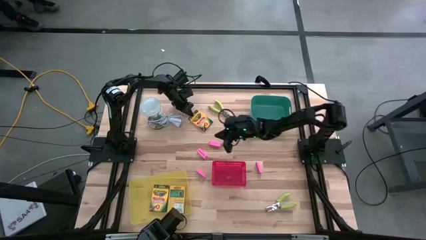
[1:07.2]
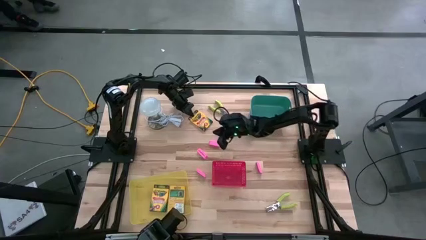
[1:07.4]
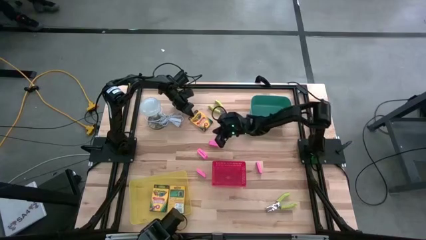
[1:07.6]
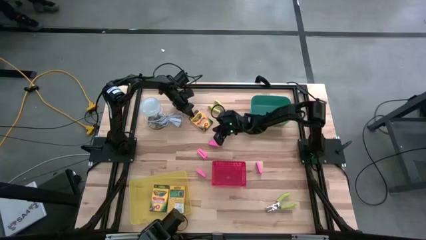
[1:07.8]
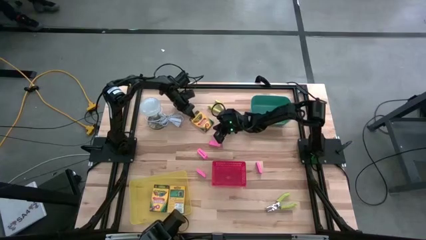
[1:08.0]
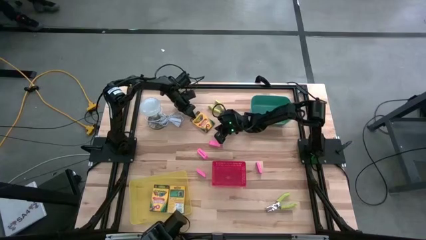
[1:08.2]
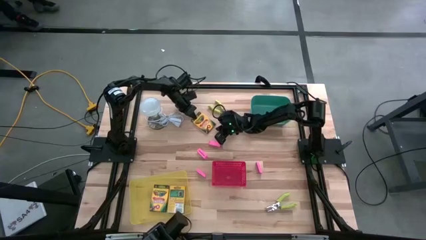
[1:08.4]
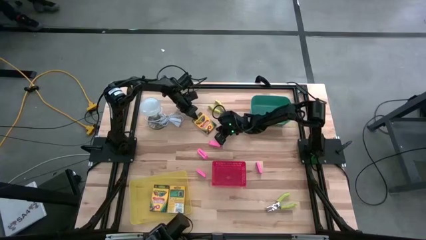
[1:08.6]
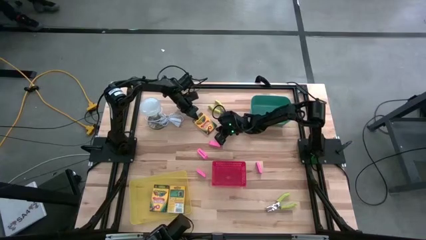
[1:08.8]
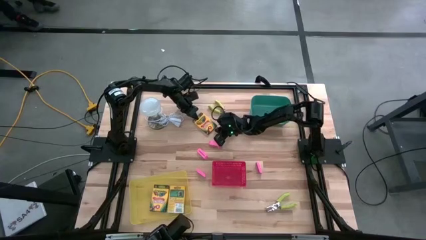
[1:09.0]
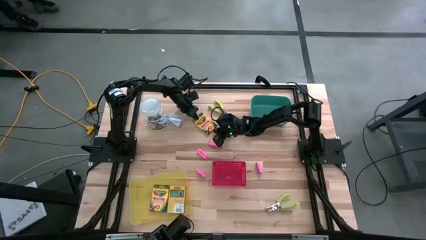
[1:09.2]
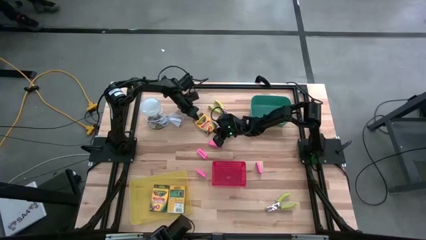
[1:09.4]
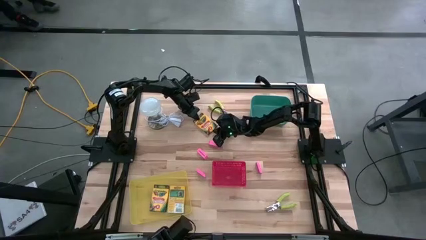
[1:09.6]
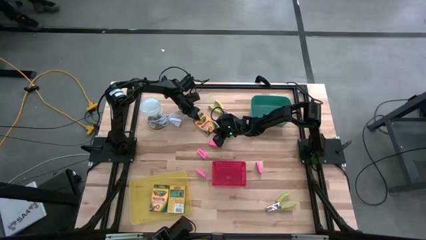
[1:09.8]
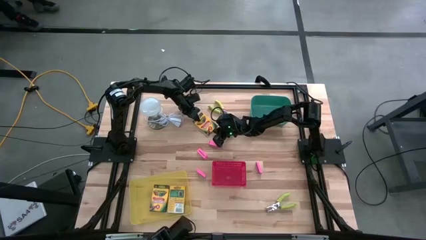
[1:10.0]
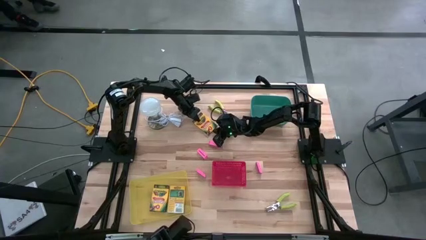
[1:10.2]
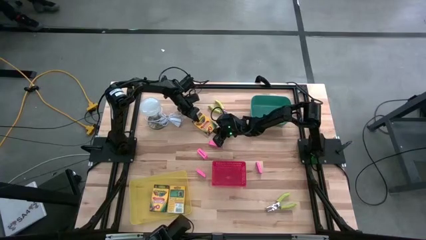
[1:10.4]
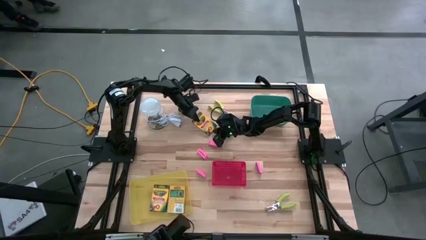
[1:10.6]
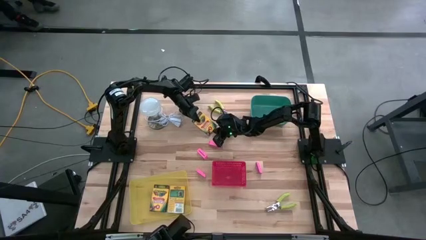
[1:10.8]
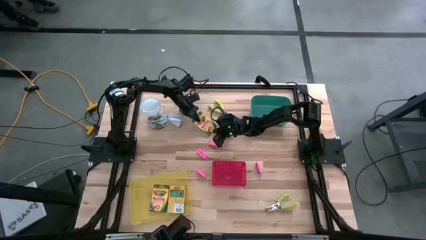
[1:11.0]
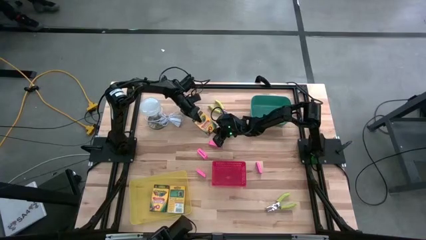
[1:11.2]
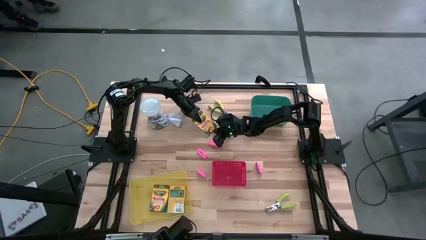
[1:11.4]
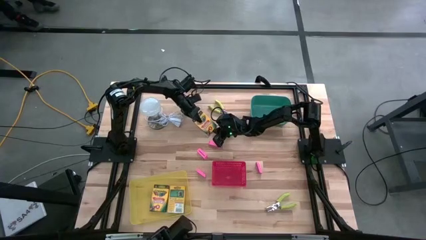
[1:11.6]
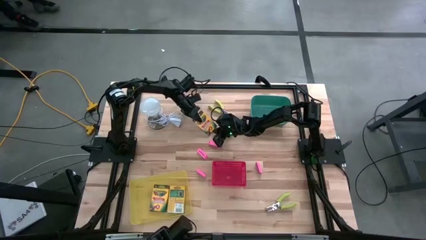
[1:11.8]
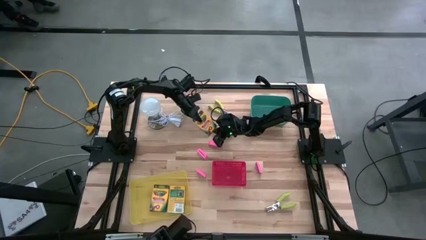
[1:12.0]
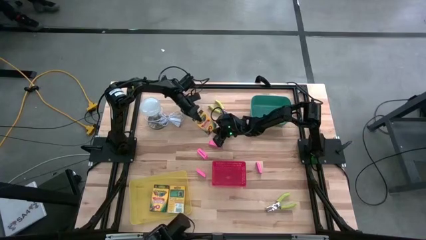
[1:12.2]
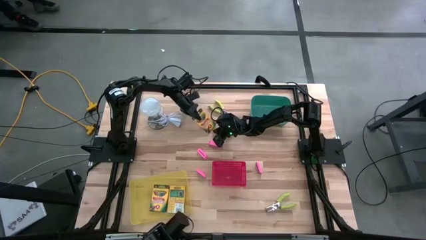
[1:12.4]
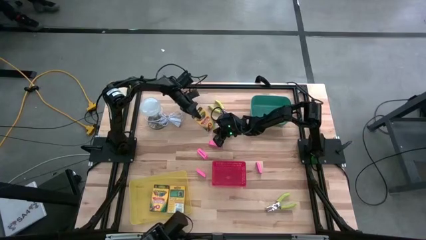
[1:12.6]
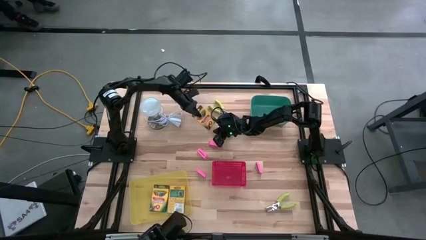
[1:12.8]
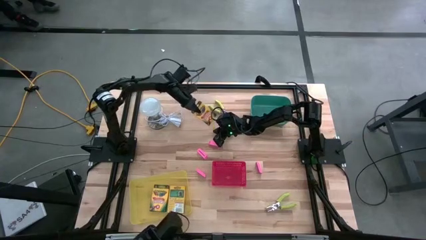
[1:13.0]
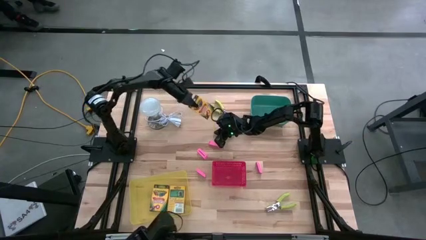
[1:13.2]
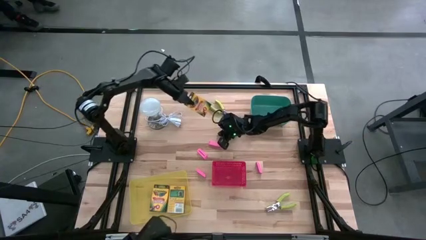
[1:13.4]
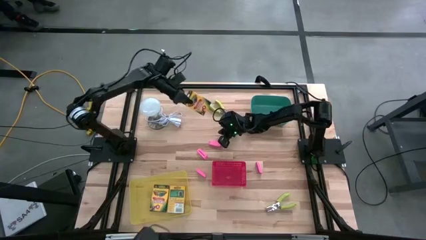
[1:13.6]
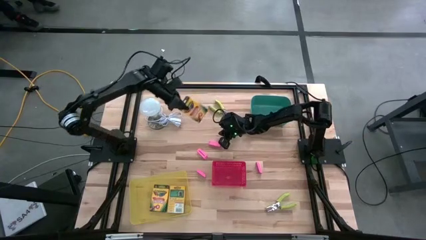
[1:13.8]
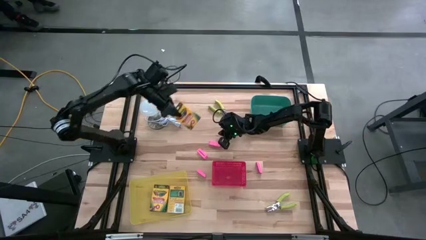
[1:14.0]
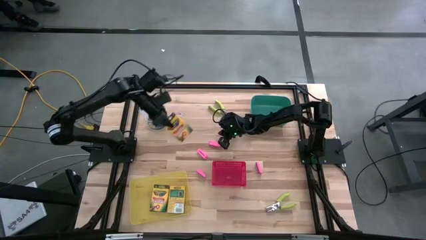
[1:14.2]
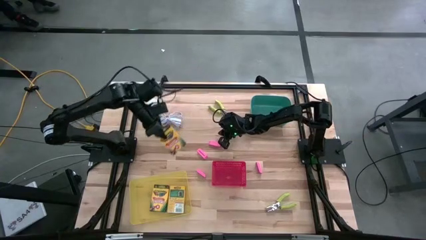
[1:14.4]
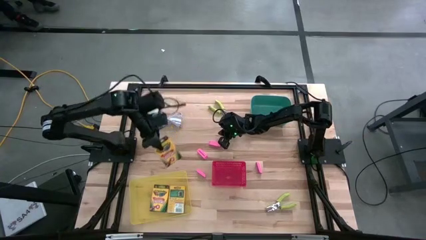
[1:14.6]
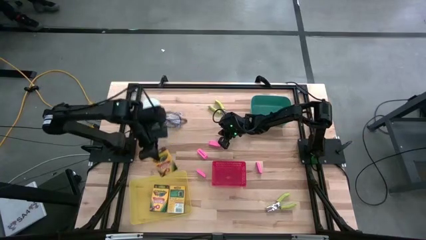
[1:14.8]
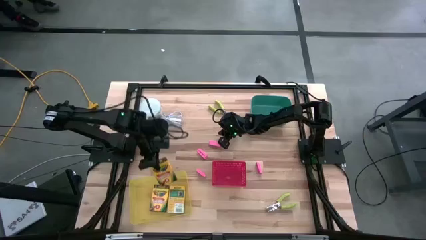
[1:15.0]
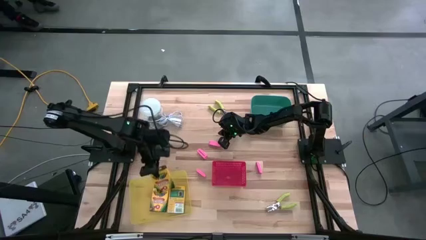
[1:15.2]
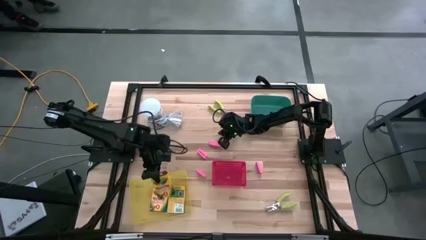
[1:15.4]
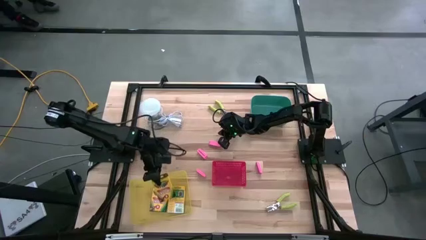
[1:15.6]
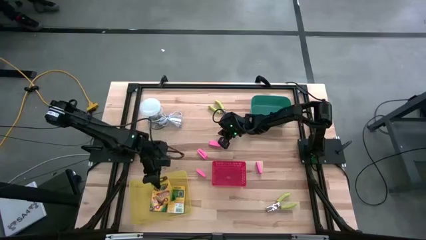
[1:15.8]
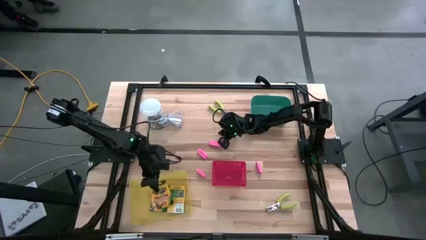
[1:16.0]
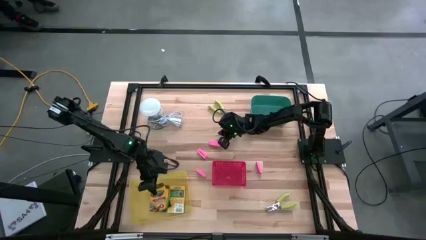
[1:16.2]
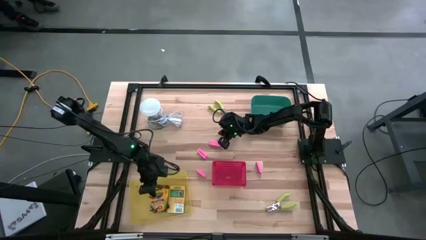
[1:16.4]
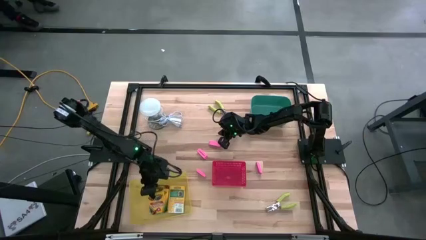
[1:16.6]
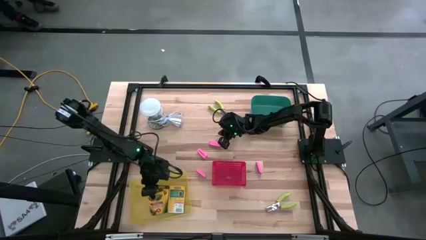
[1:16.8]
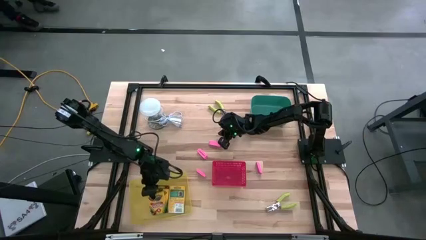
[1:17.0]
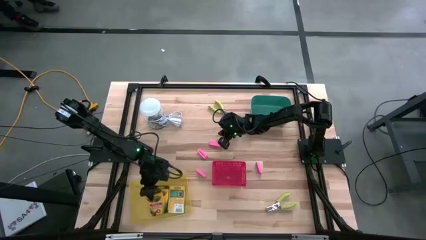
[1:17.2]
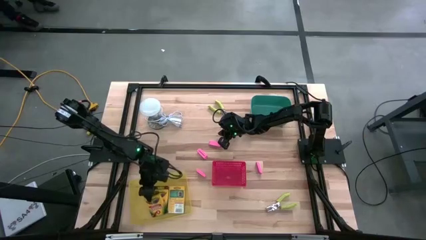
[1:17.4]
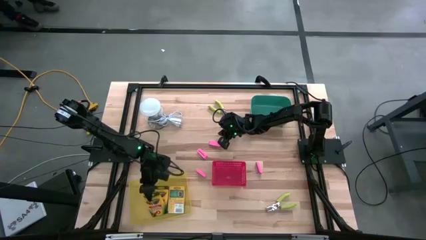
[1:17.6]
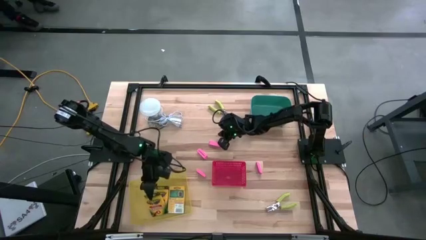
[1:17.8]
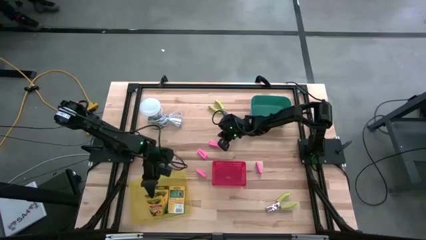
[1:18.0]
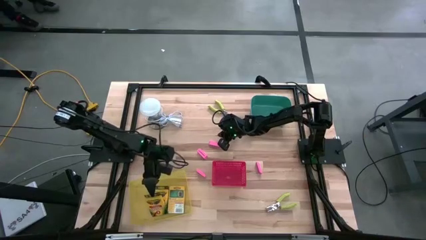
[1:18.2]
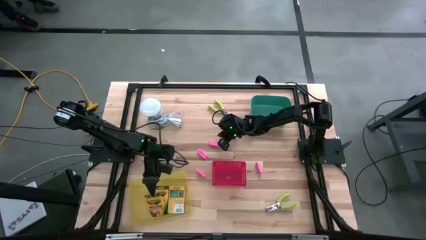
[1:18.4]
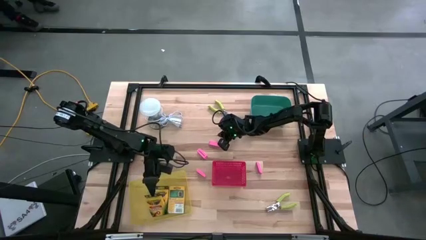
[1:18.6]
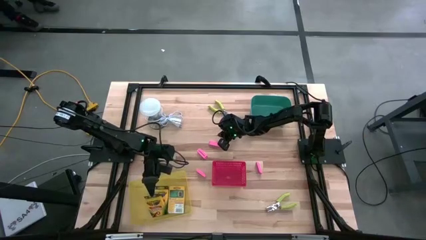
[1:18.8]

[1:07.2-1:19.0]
Task: Pick & Place School Supplies
Put the yellow crayon box into the yellow bin

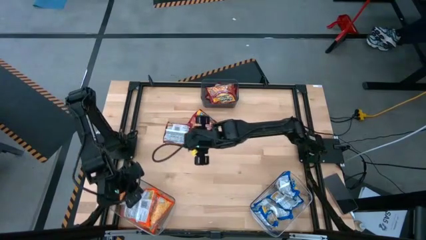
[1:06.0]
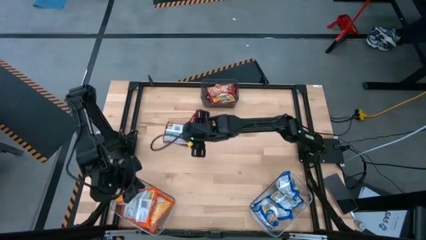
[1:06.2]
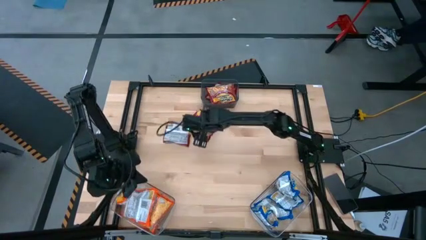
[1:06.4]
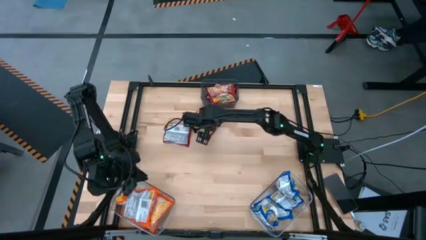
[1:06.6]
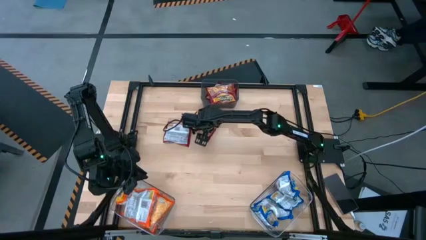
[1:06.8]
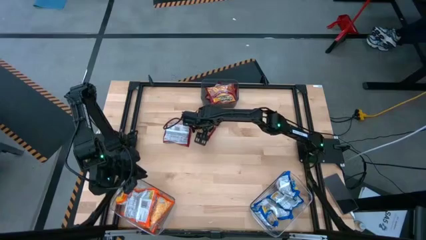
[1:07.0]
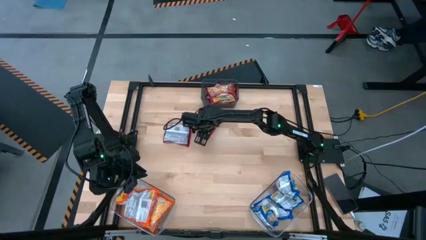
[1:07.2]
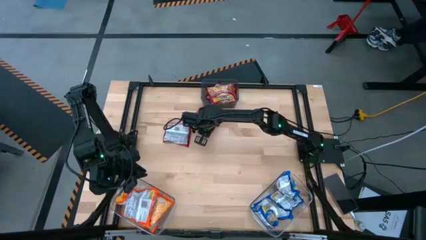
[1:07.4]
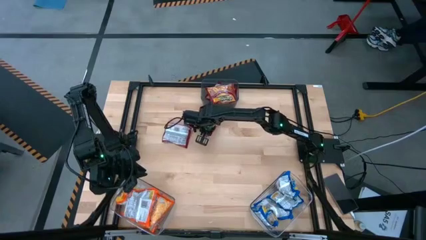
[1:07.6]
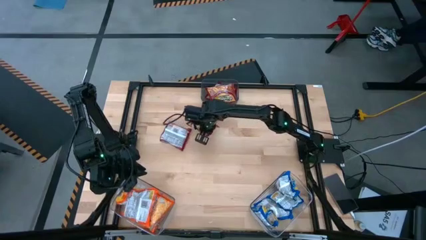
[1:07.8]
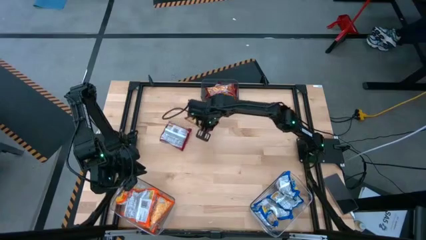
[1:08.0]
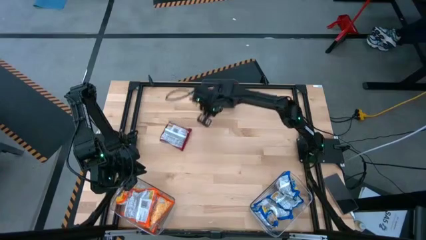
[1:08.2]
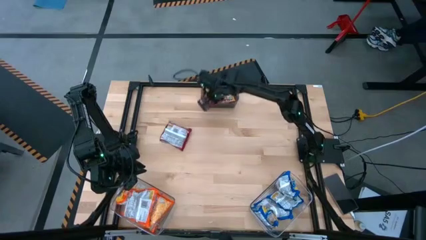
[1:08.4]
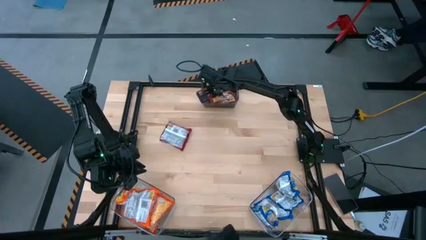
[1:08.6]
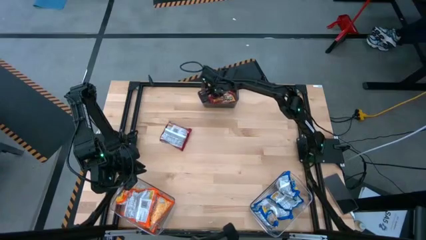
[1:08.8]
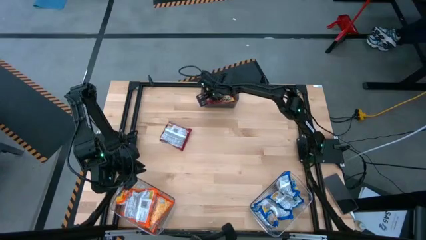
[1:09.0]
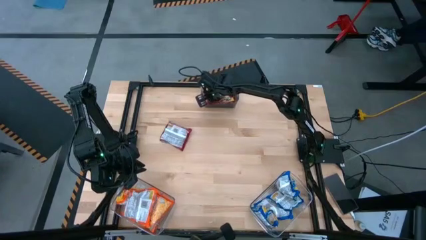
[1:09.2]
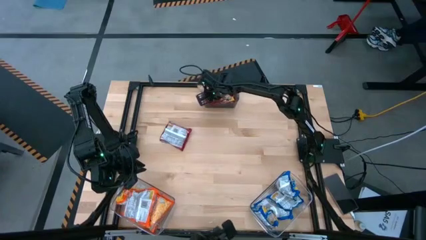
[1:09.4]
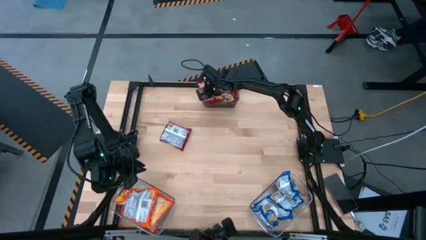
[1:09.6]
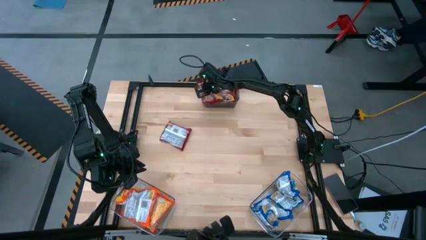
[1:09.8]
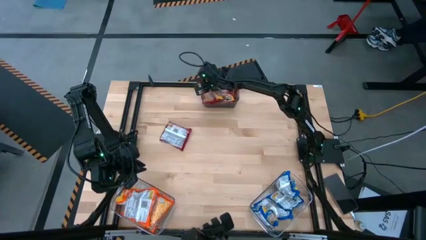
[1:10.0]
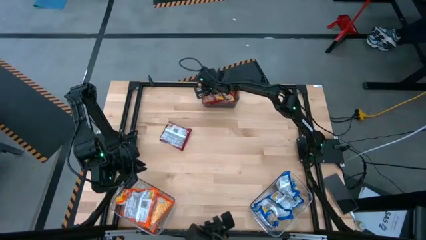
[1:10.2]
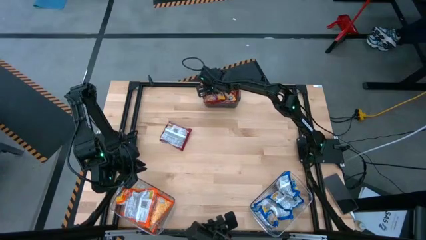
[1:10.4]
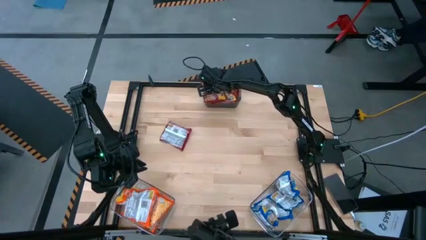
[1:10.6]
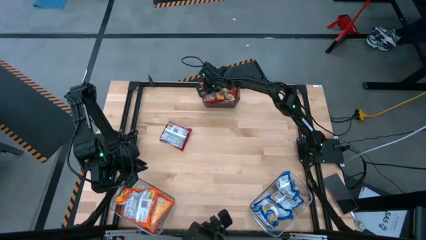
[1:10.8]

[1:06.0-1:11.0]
Task: Sort Maruchan noodles
Put the red noodle pack into the black bin
